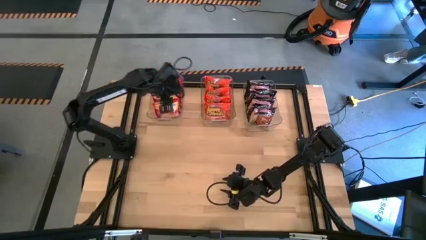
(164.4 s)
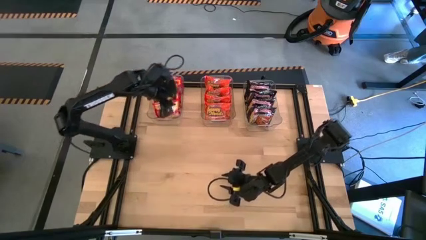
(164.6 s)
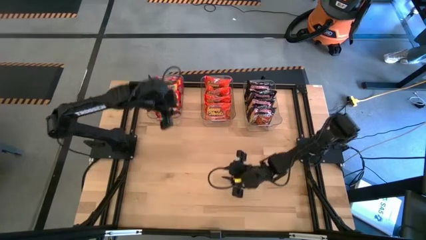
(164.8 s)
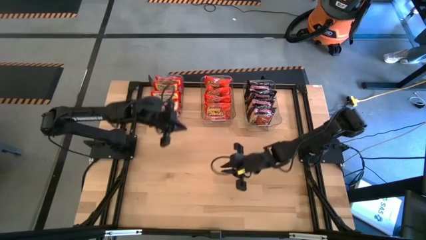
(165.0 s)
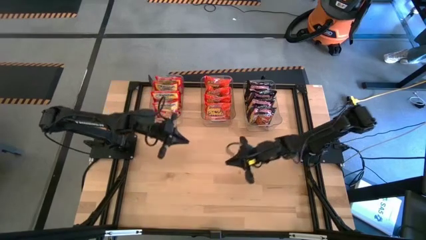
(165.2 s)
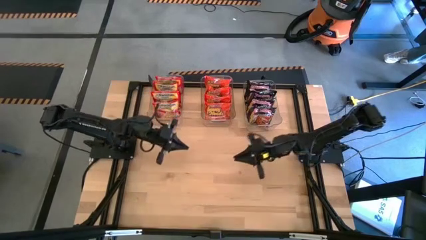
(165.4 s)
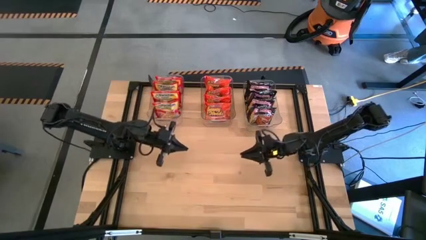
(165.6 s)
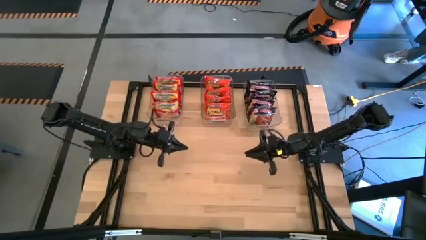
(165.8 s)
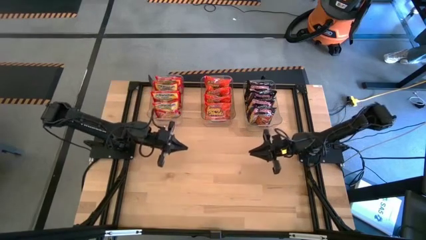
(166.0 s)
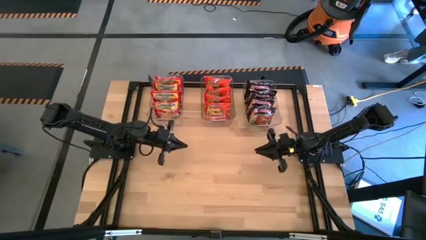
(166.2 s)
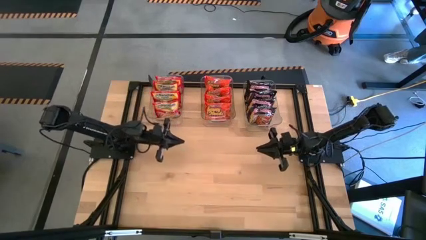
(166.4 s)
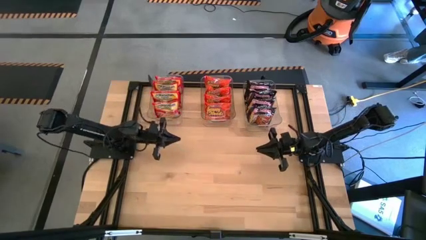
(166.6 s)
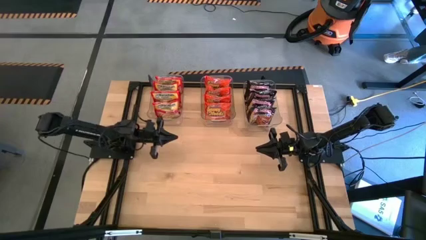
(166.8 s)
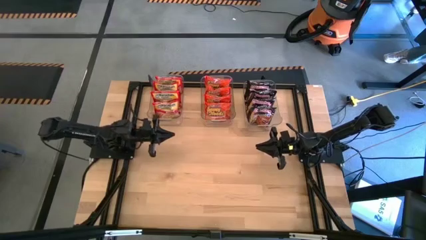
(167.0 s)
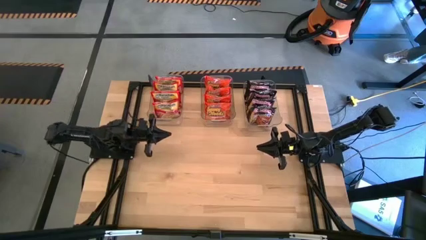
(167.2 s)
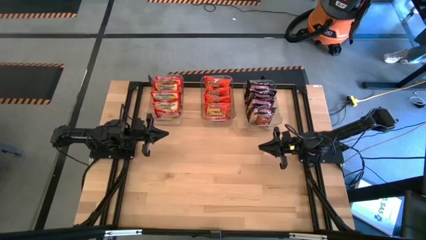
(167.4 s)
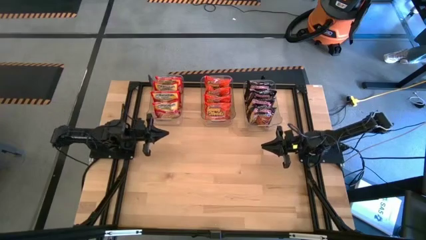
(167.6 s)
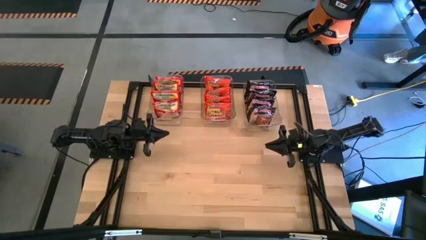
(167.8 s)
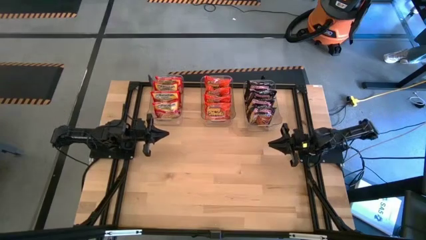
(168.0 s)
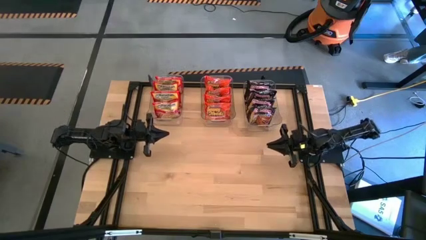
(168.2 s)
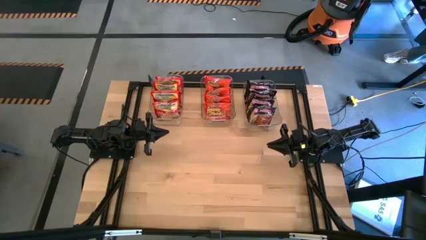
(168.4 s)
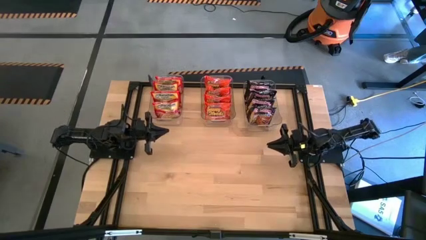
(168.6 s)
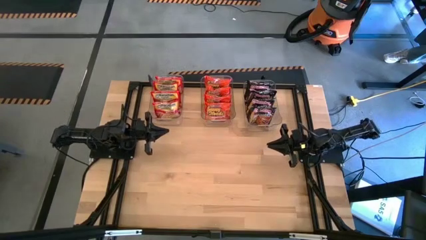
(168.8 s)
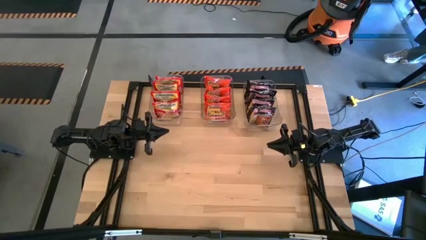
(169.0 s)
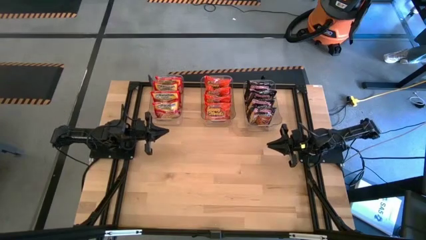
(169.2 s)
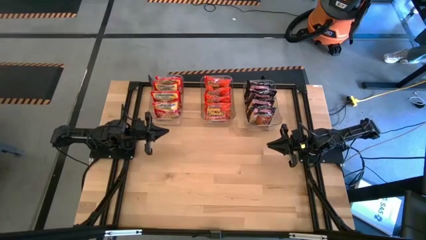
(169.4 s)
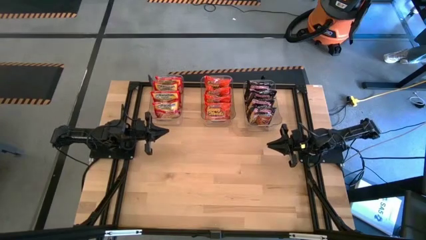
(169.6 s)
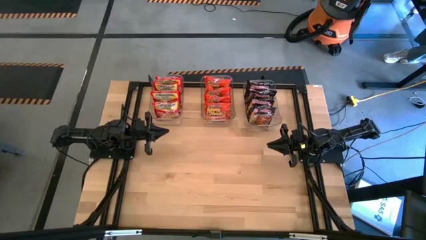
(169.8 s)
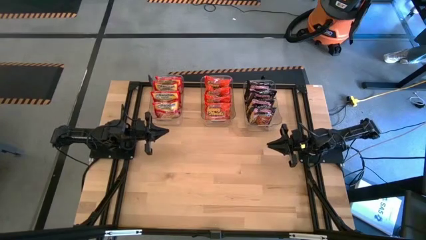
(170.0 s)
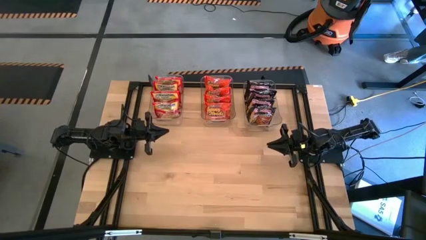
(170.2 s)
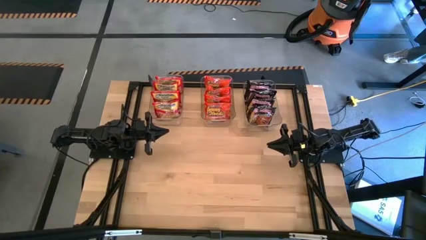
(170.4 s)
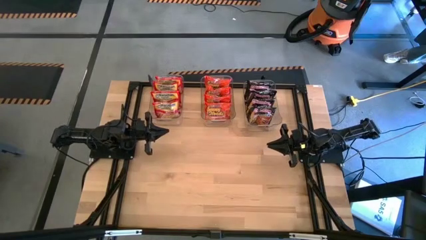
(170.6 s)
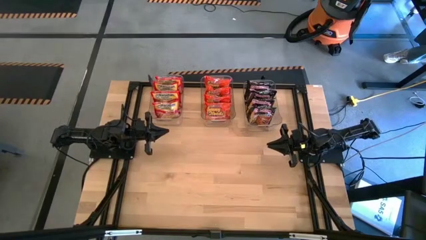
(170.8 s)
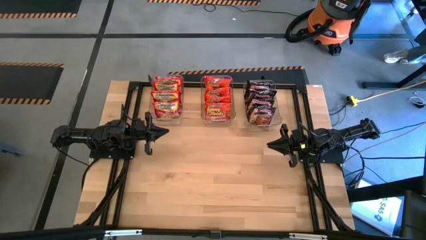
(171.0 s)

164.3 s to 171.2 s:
Task: Sort Maruchan noodles
Return to Home Position

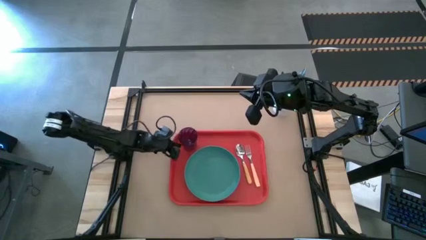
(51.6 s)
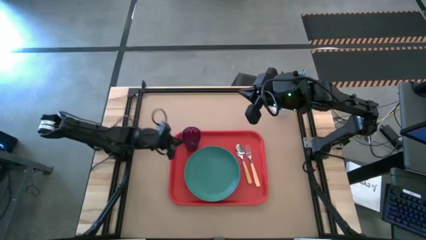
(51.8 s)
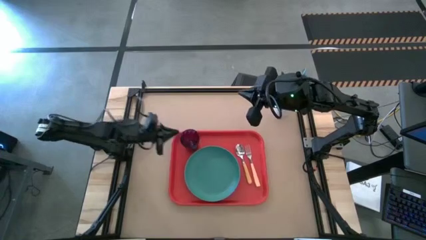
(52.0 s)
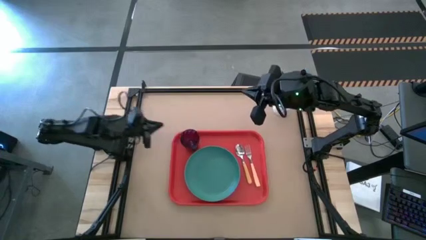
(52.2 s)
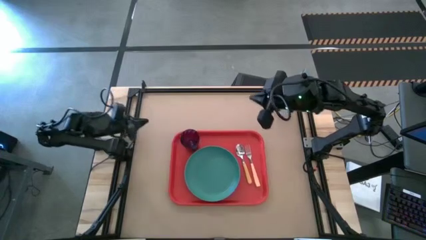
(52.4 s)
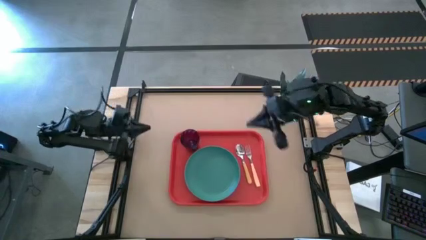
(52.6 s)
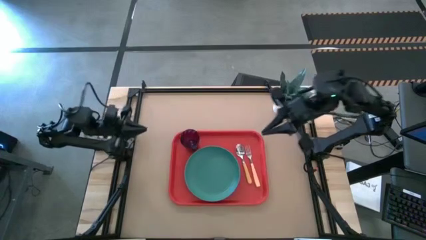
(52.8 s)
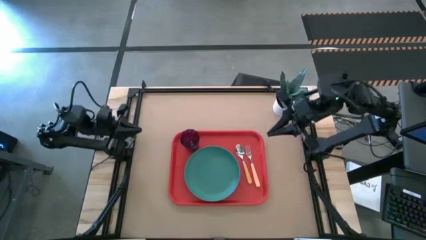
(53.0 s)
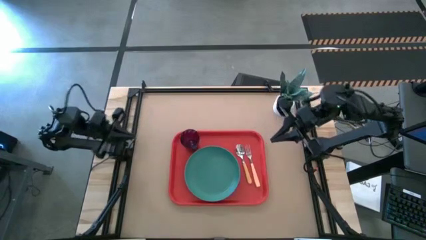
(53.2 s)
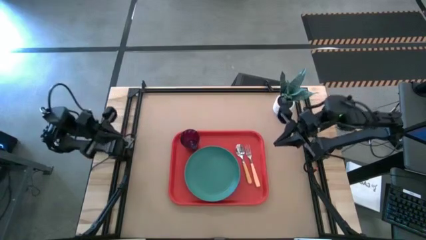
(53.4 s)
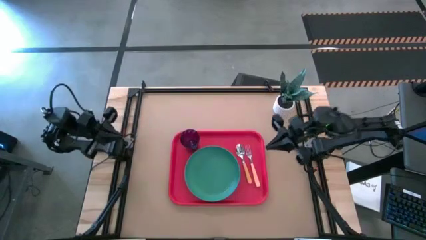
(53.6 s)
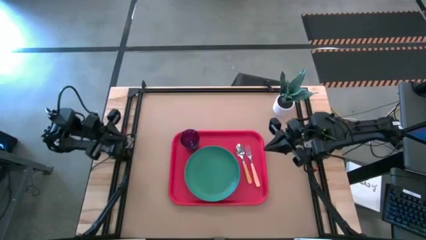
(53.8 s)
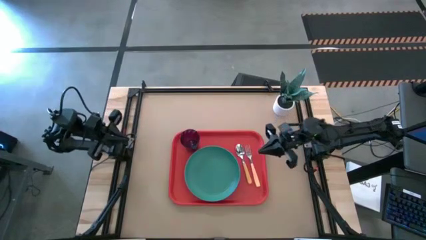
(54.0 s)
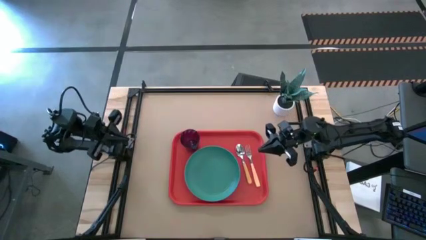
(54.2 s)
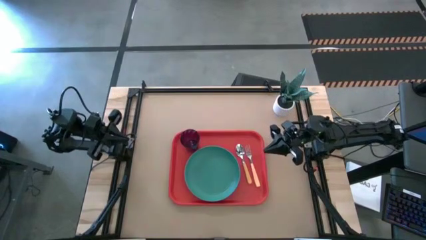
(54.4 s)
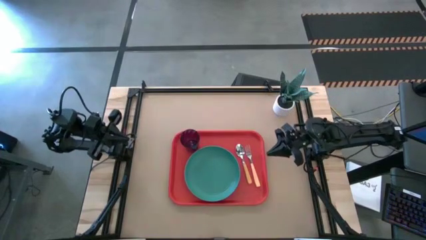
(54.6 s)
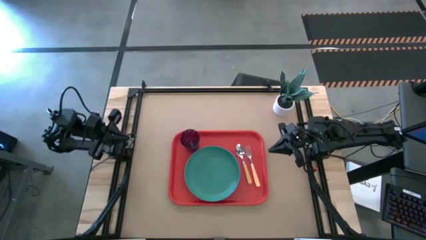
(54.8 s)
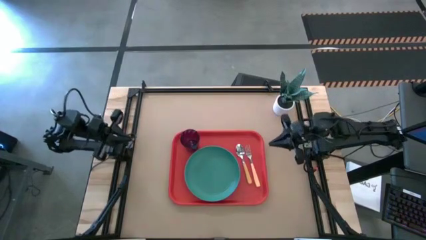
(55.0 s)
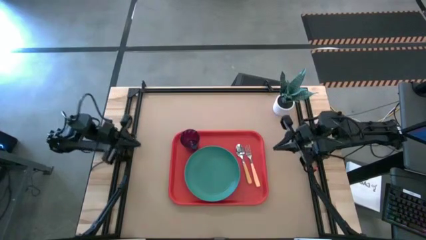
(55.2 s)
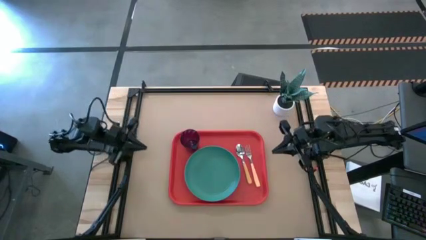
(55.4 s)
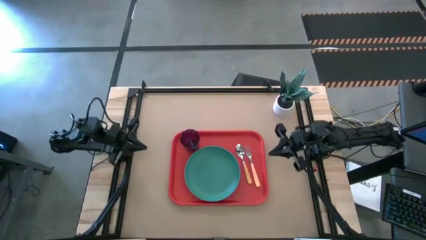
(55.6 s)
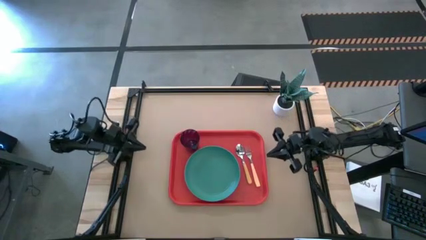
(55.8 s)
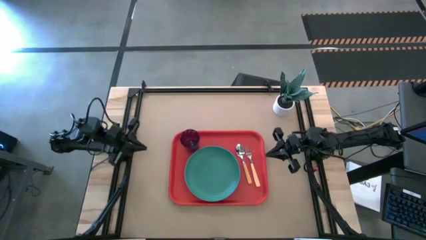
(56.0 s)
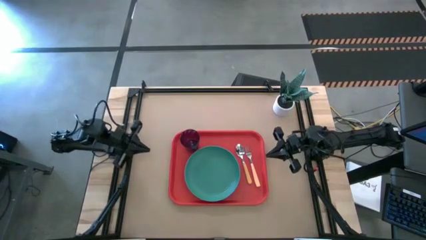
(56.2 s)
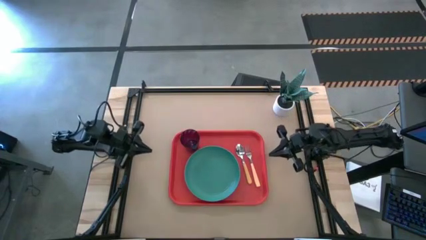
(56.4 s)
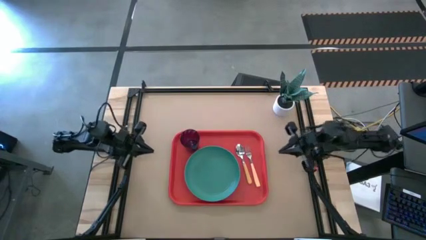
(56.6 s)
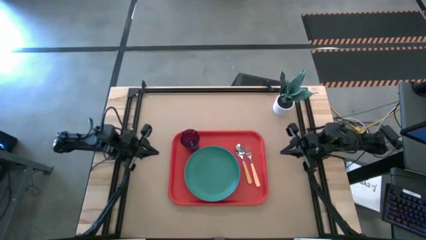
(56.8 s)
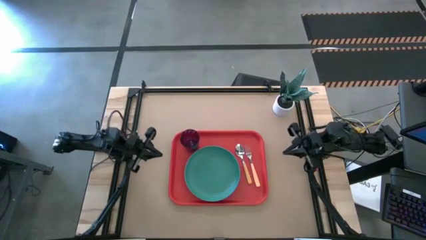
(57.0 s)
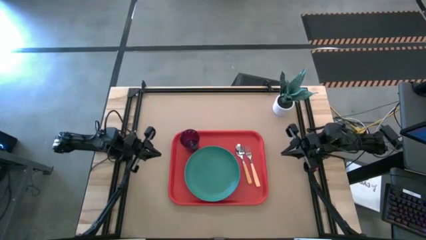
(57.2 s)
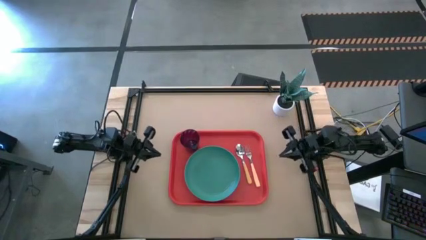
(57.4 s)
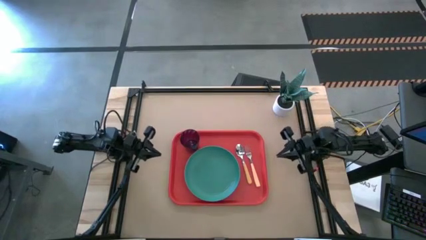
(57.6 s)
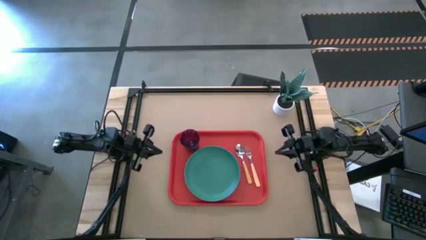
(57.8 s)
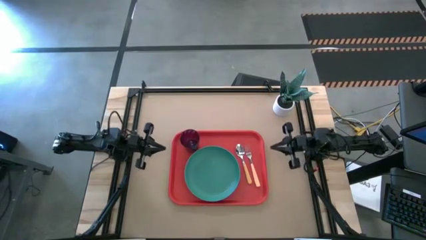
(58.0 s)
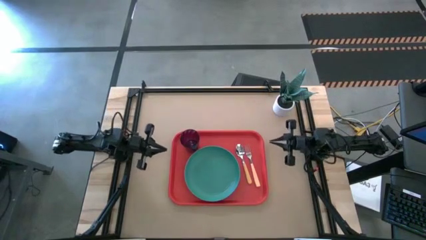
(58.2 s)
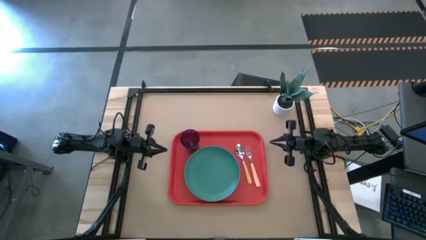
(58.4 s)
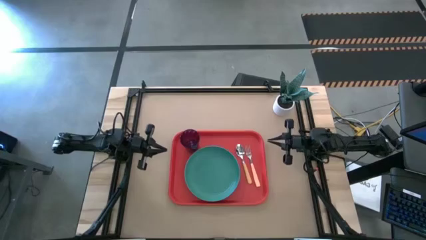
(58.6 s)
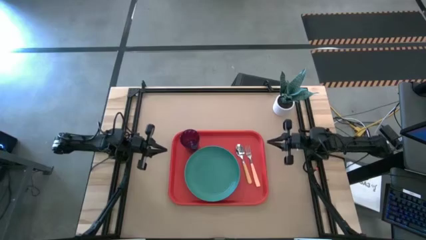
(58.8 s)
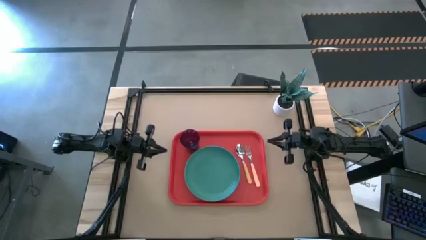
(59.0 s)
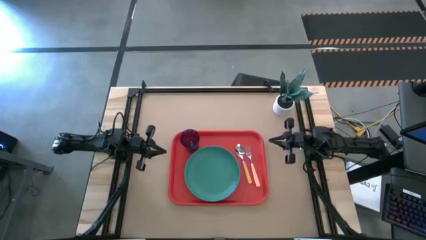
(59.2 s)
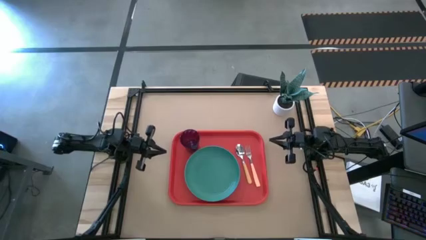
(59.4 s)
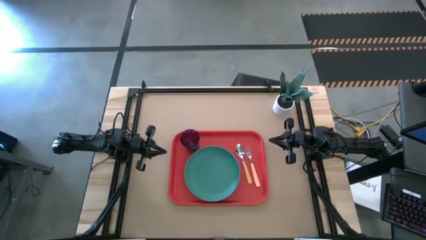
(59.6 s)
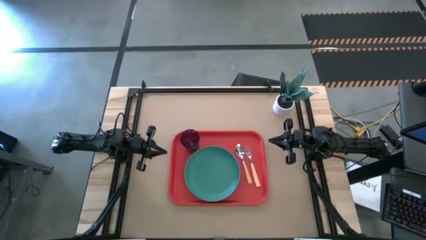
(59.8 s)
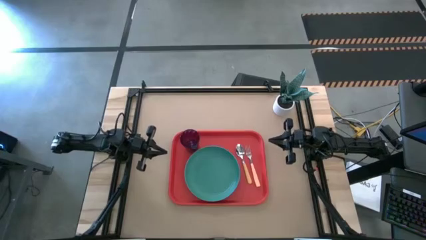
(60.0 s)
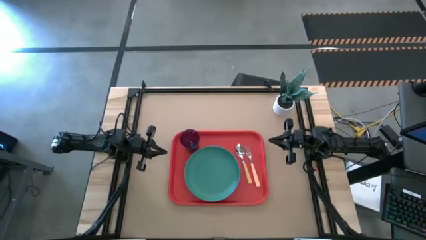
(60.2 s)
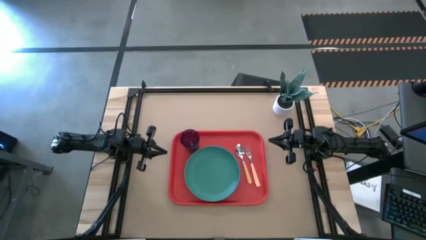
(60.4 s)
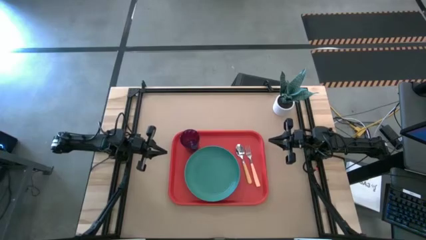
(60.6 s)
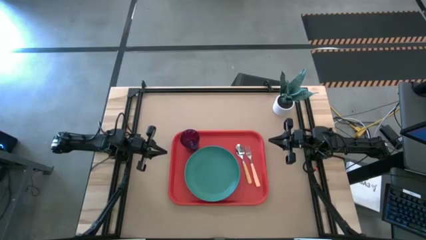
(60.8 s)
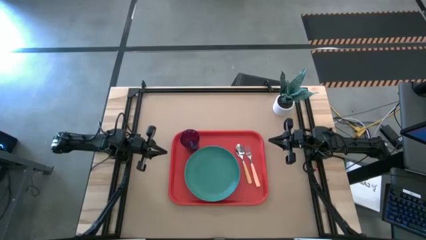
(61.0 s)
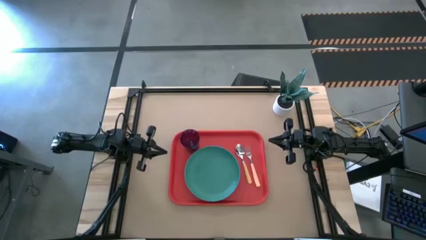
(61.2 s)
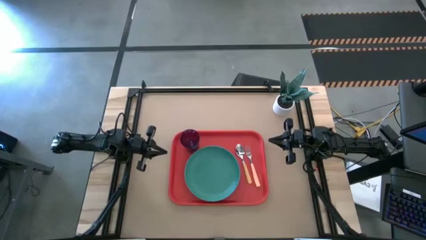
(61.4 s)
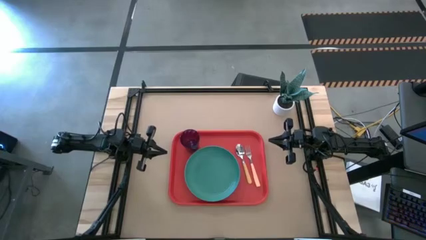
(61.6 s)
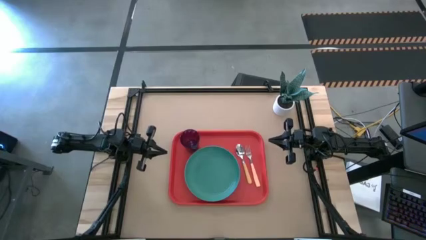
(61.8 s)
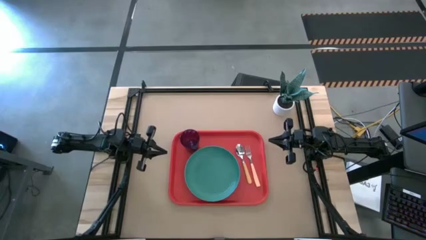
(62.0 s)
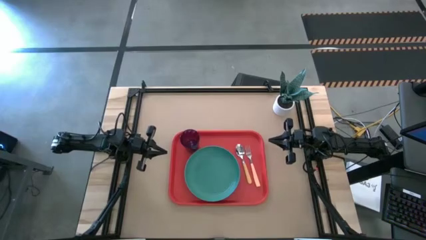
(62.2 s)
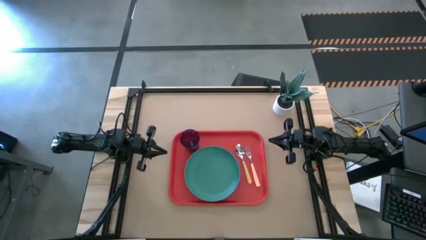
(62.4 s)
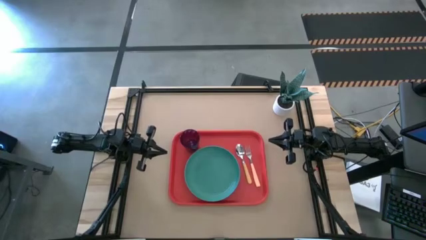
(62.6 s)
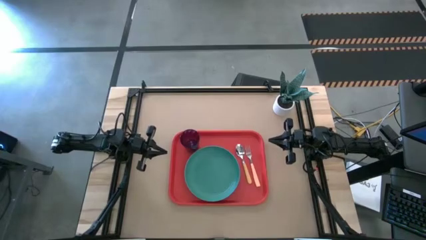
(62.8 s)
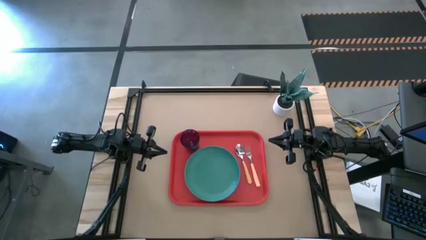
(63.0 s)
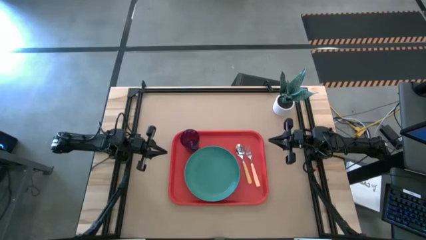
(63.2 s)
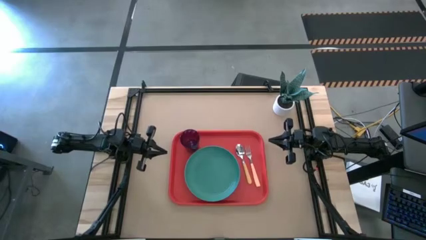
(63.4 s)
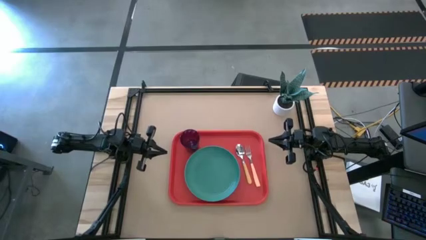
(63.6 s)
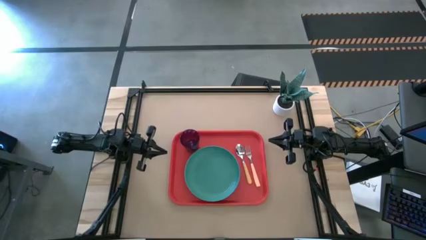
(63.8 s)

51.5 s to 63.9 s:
Task: Pick and place plate/cup/fork/spoon on tray
Return to Home Position
